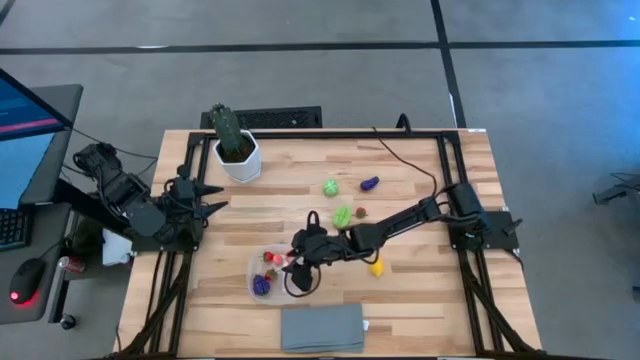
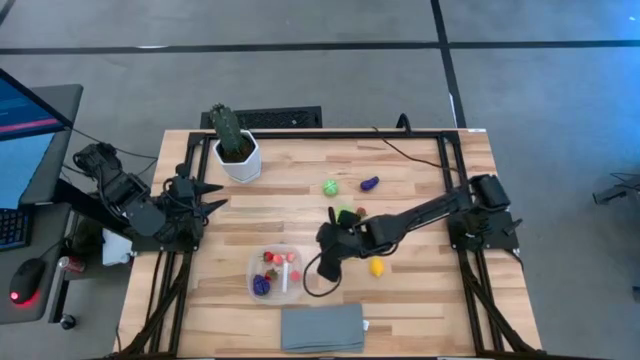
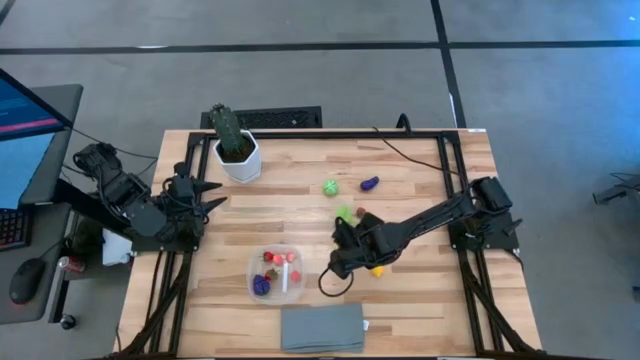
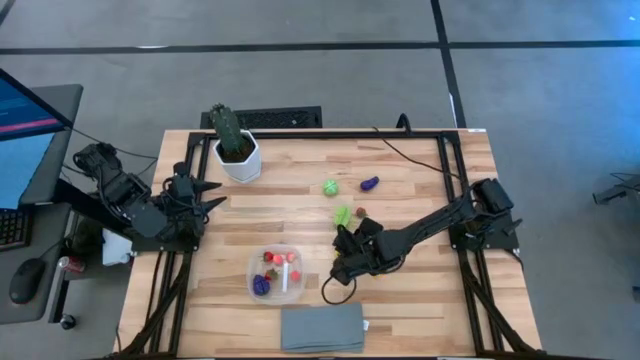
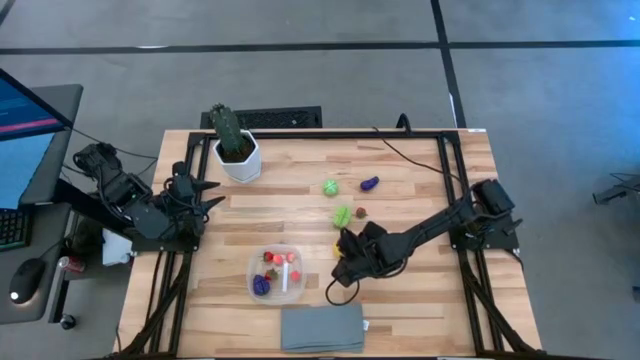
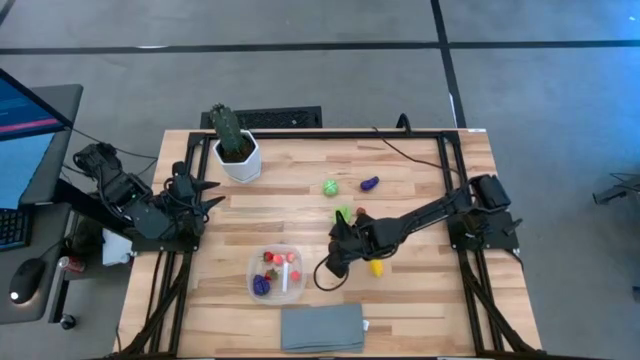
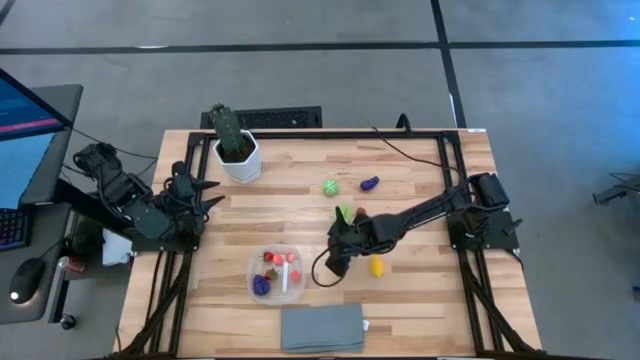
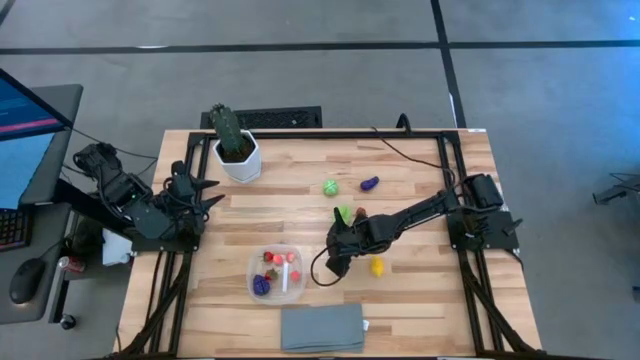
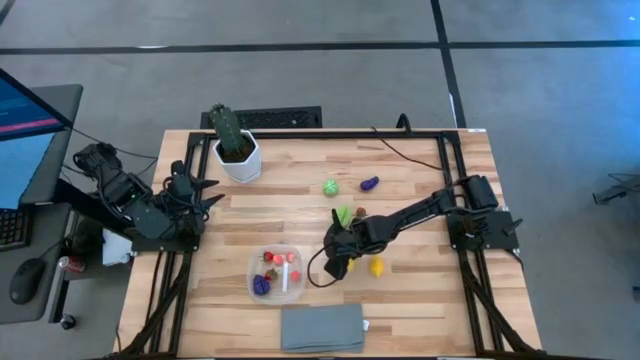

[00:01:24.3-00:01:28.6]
Task: Pick and placing Produce into tupperware
Put the left lemon into the transparent bin

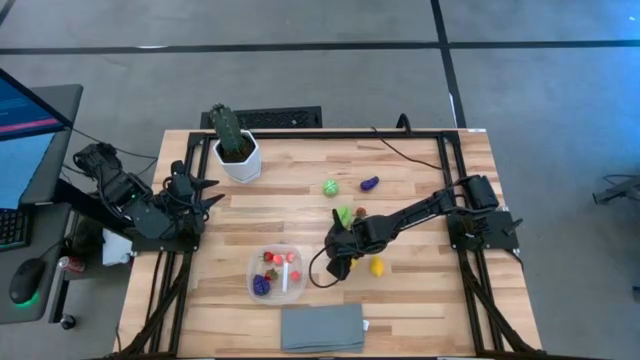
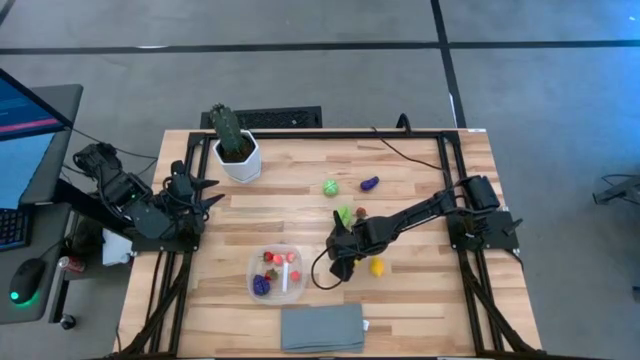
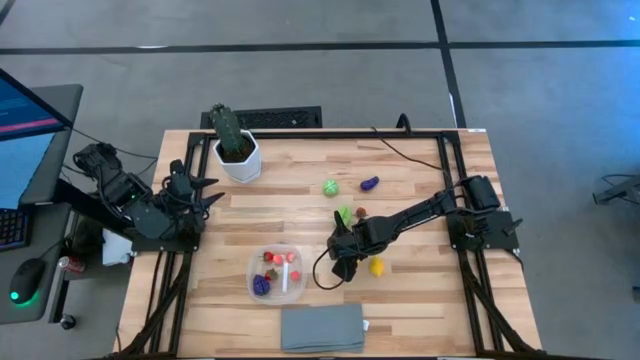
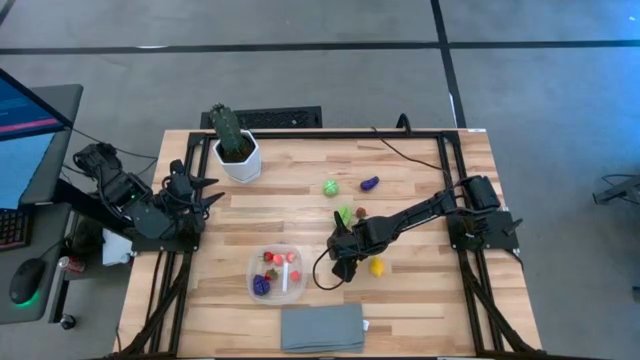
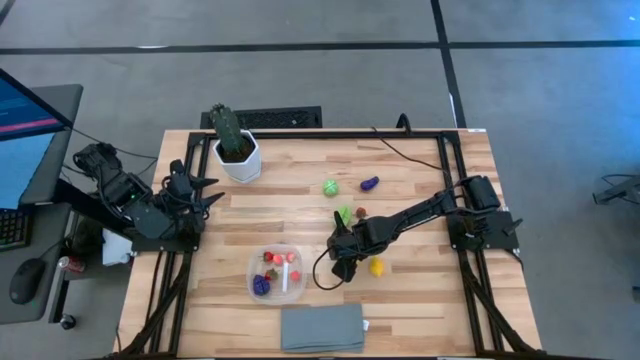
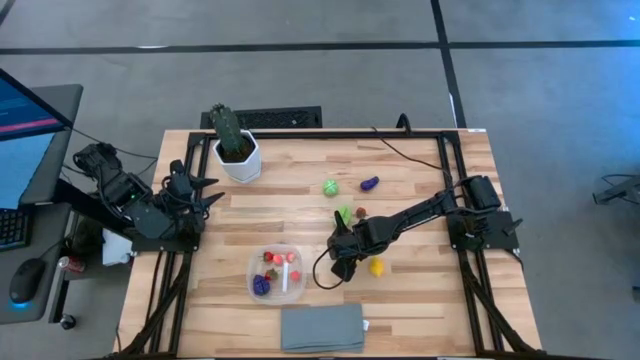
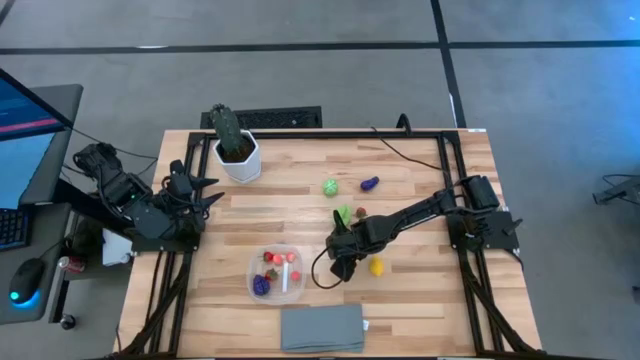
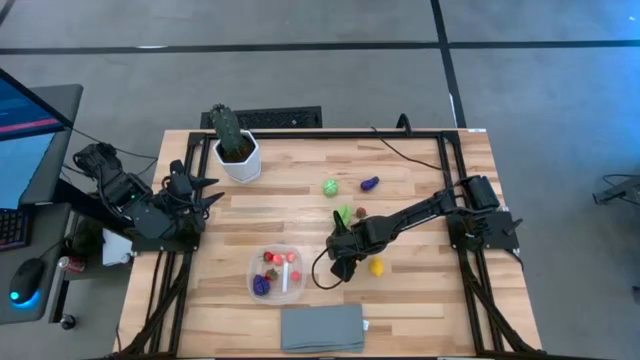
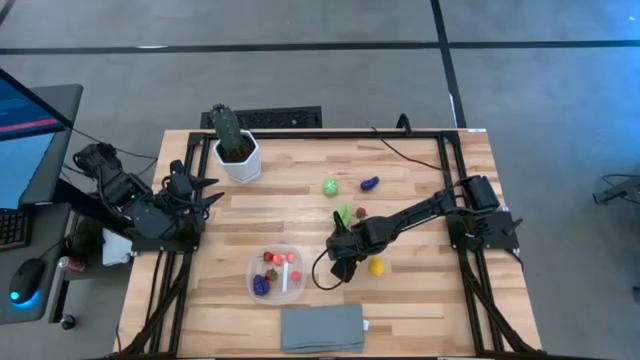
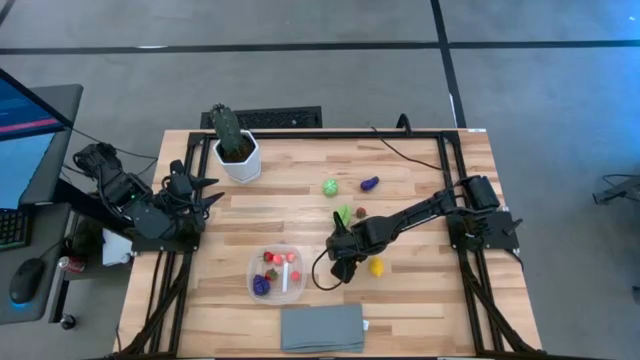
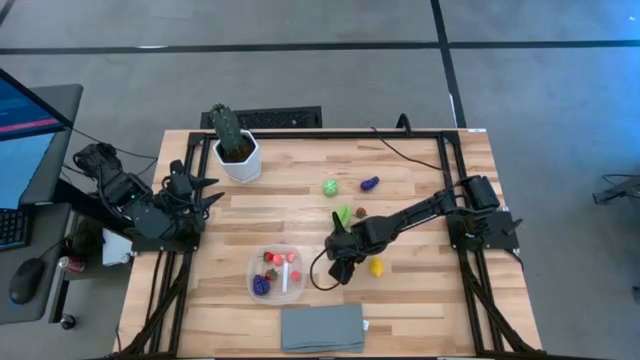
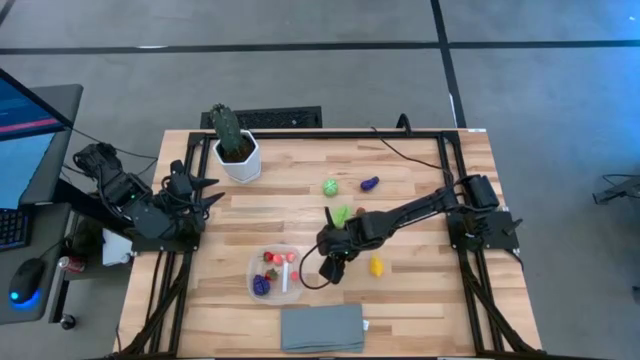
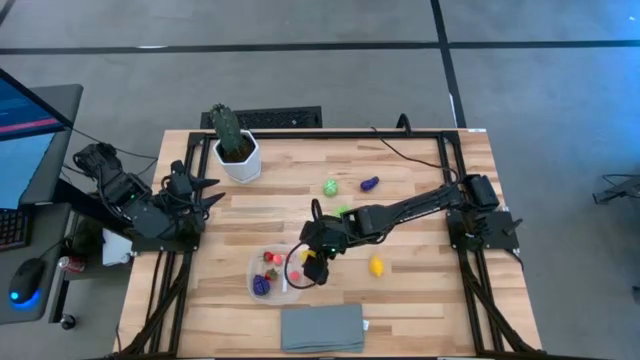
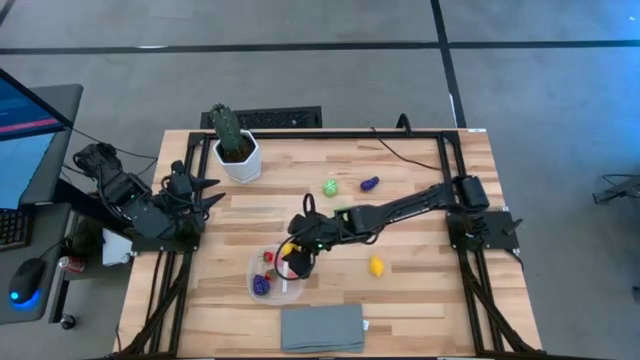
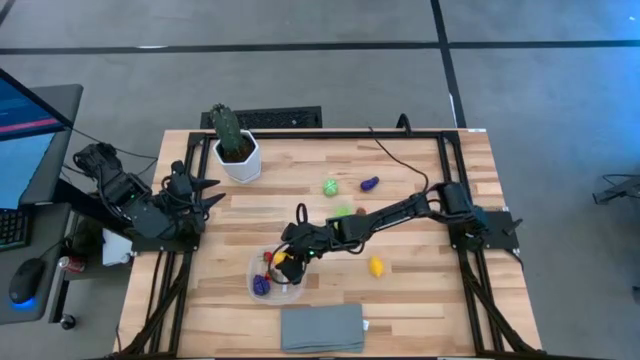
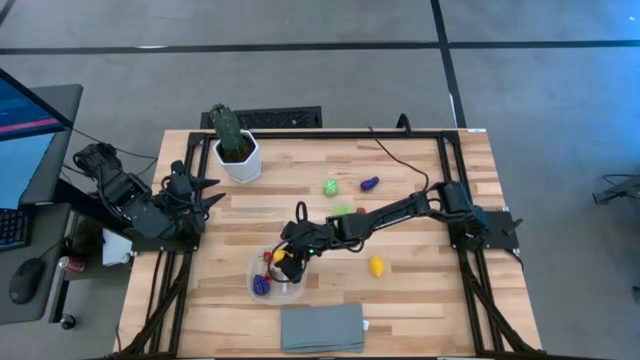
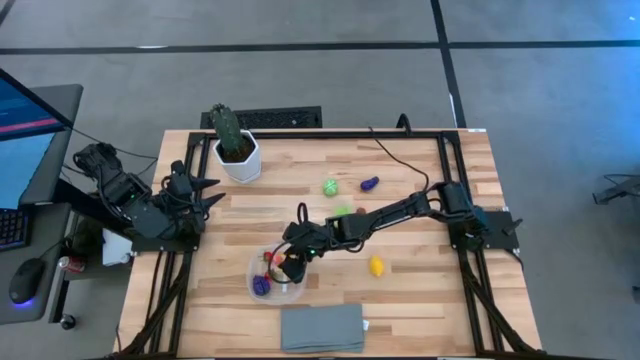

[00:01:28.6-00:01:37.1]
Put the left lemon into the transparent bin

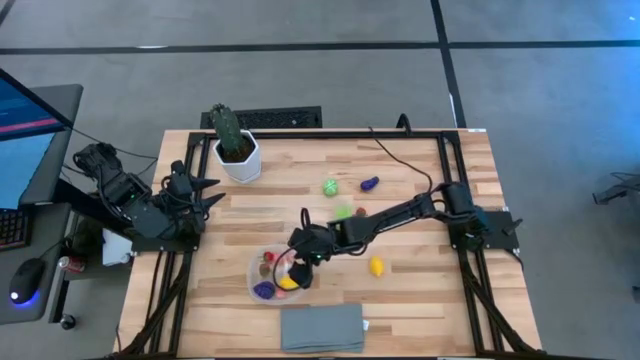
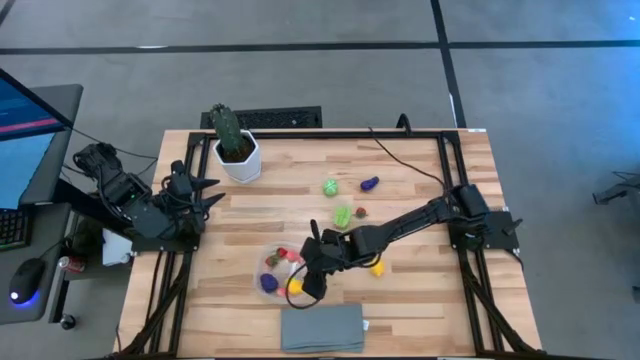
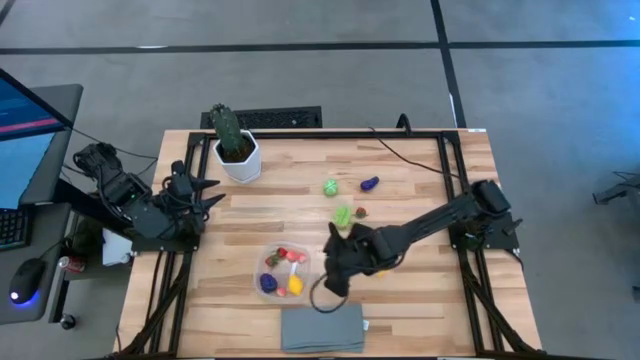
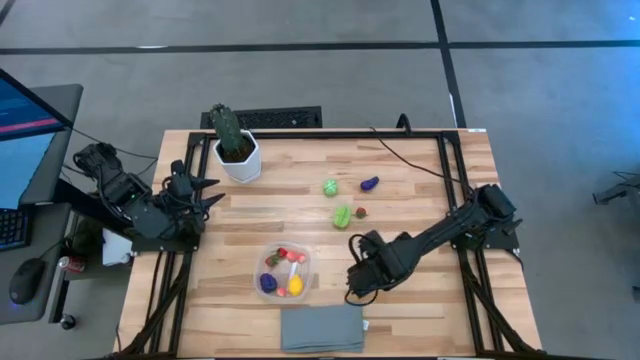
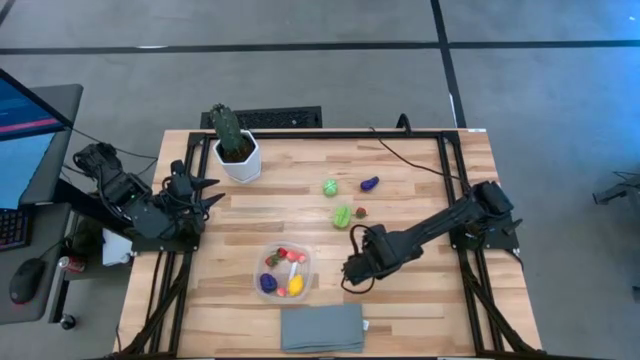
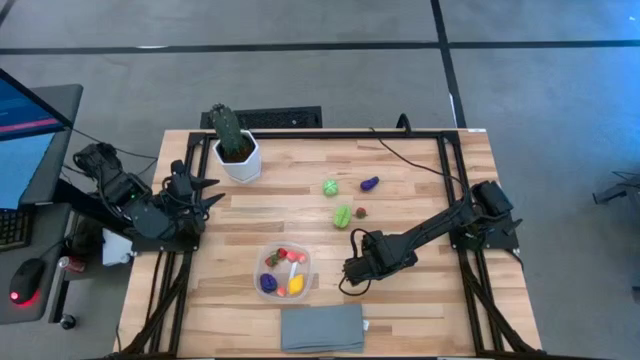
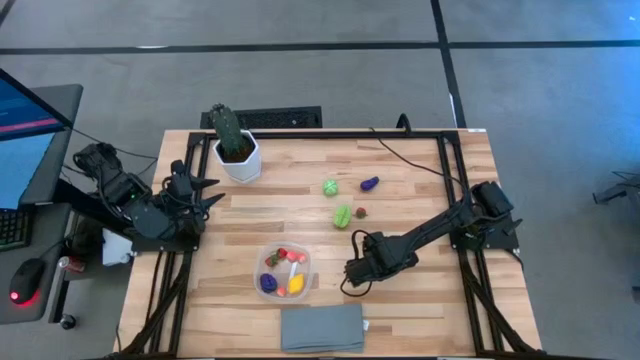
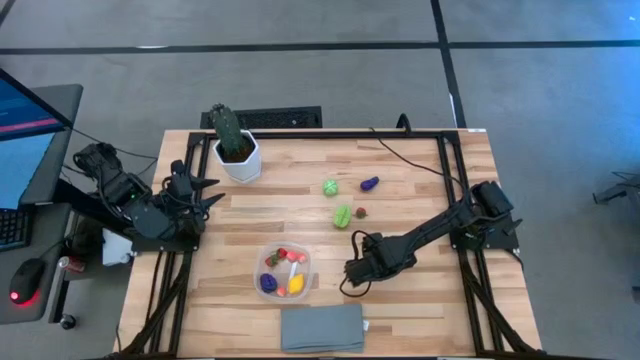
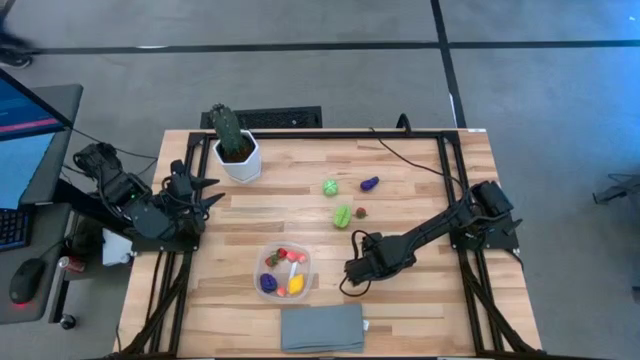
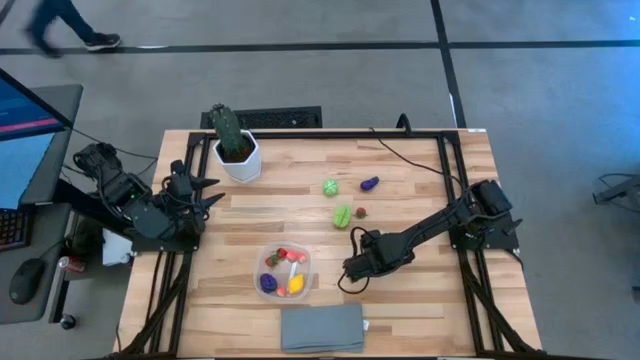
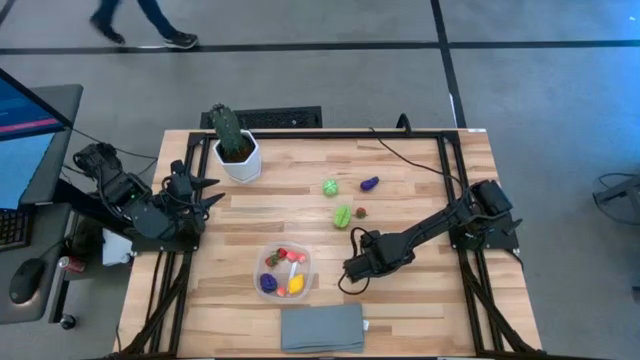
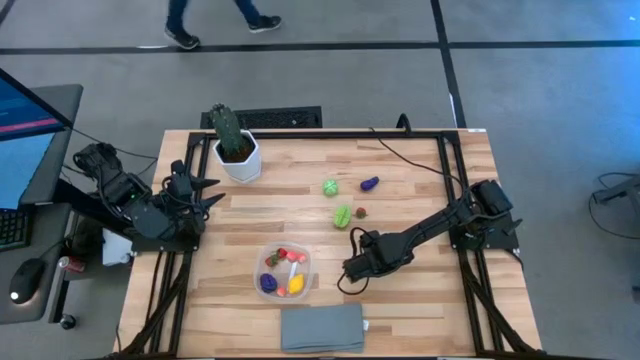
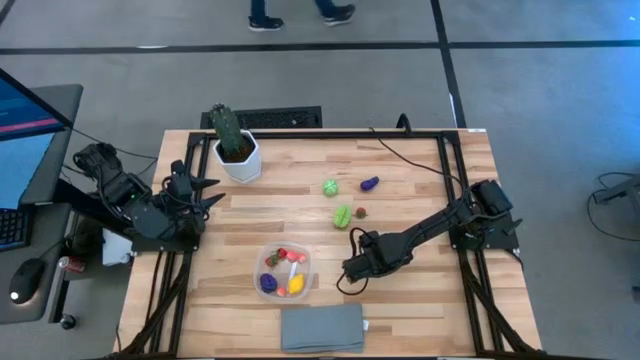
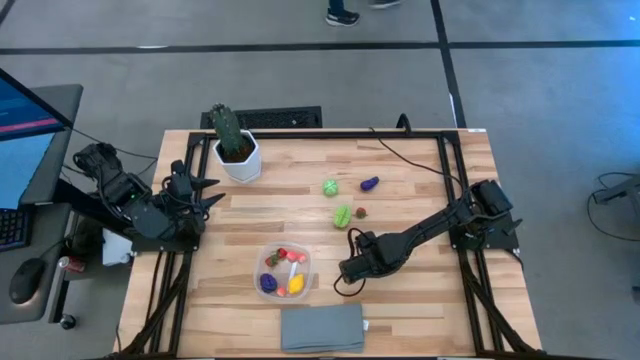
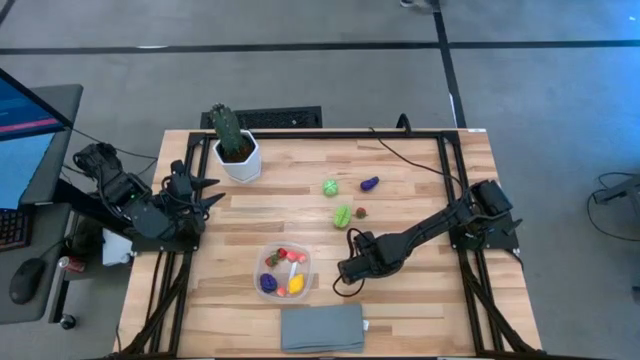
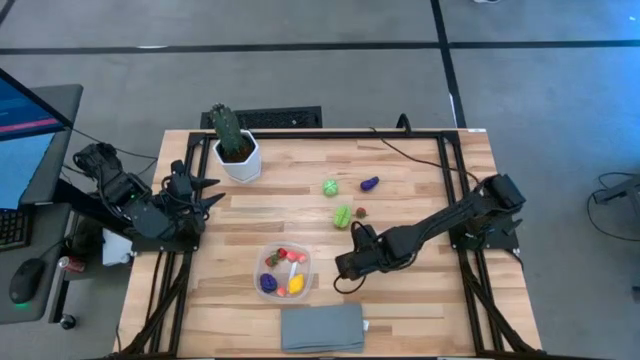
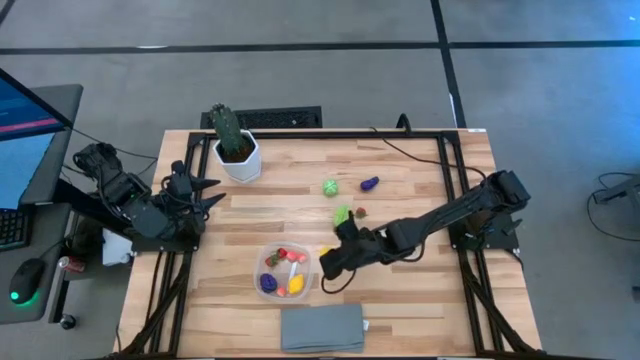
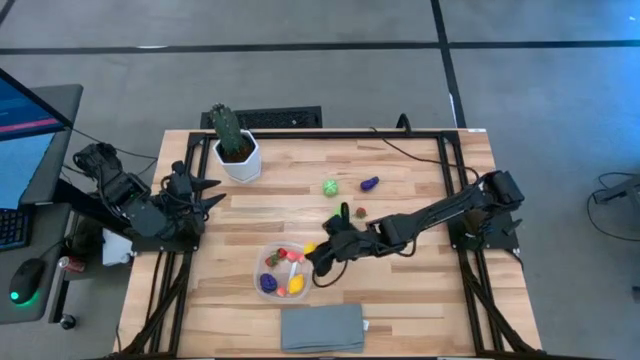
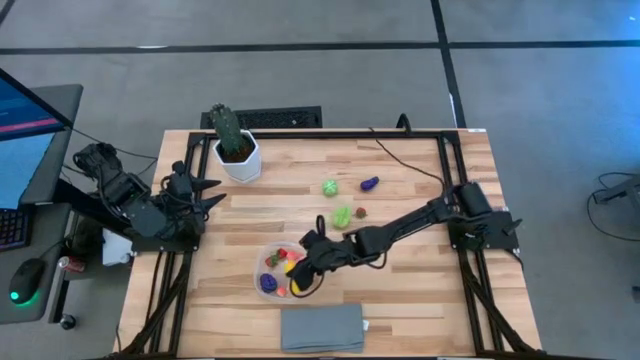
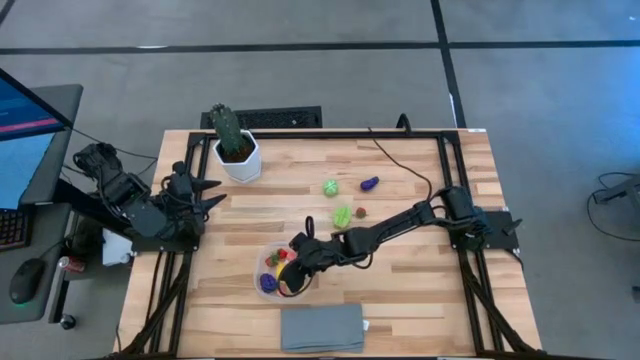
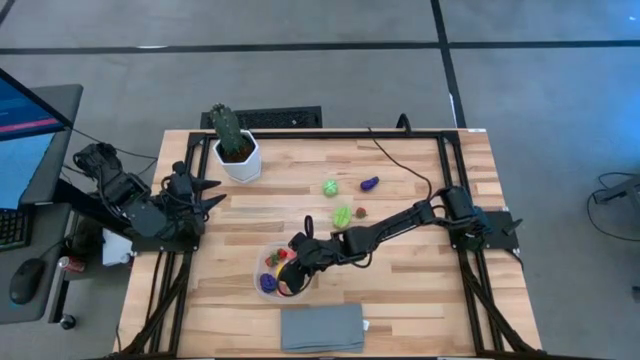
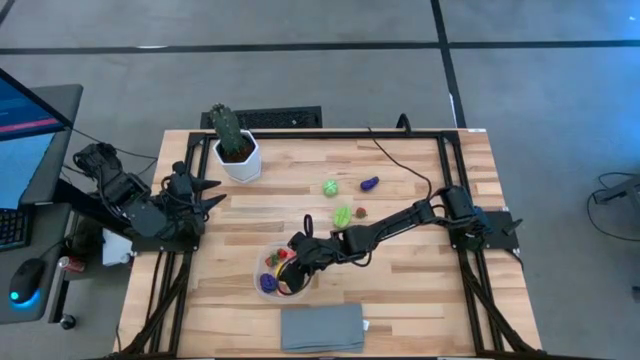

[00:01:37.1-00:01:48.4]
Put the lemon into the transparent bin
